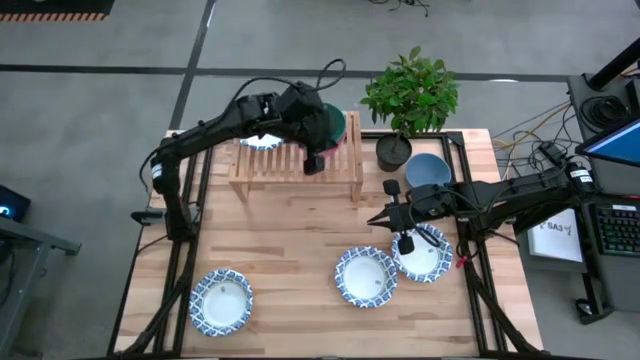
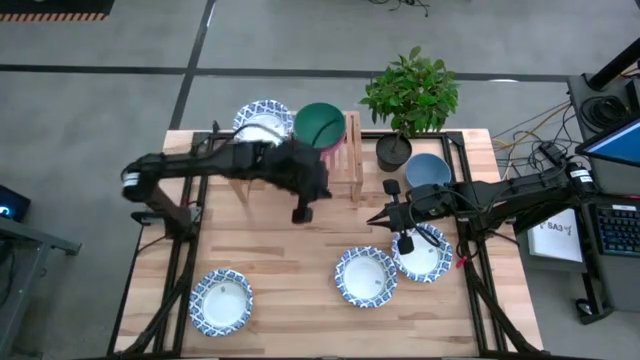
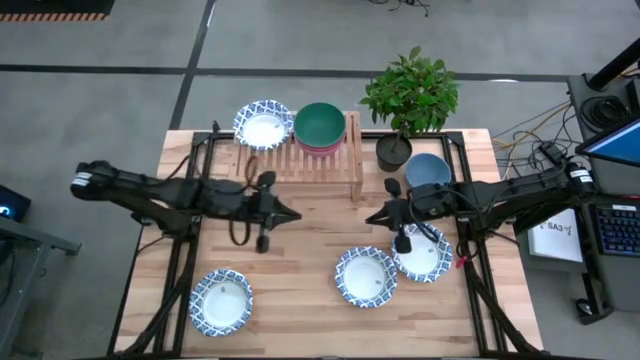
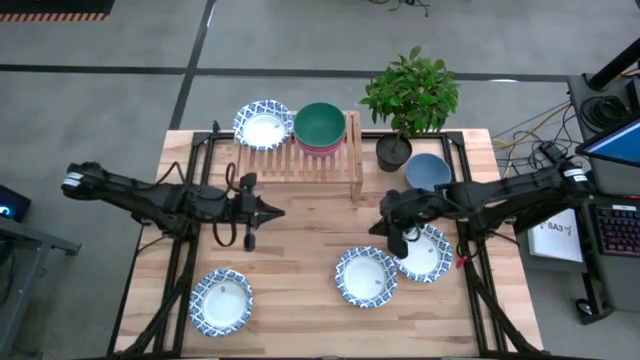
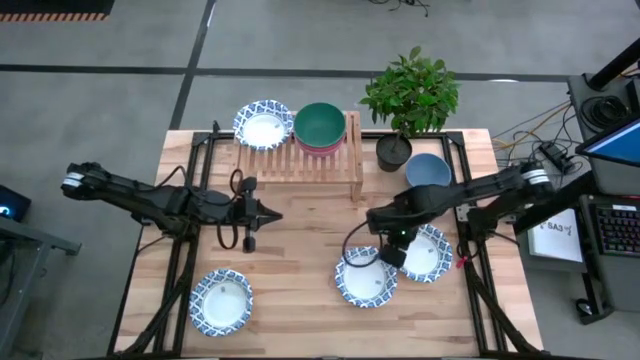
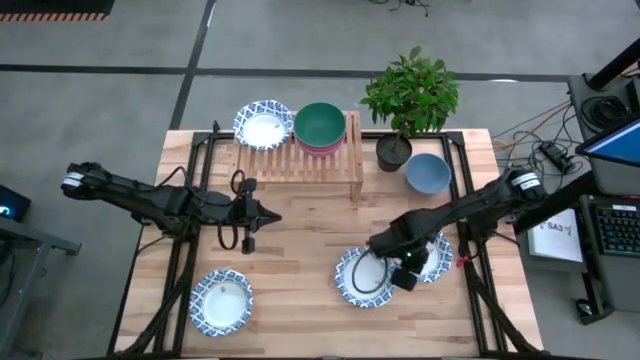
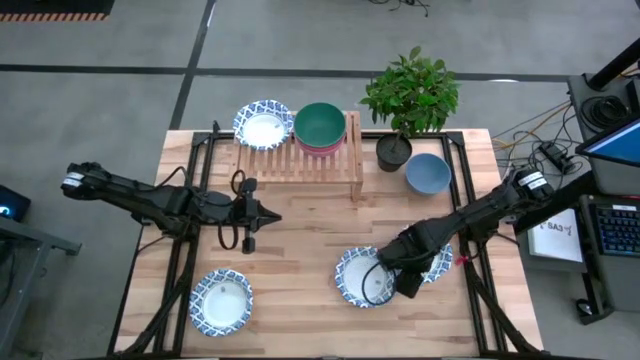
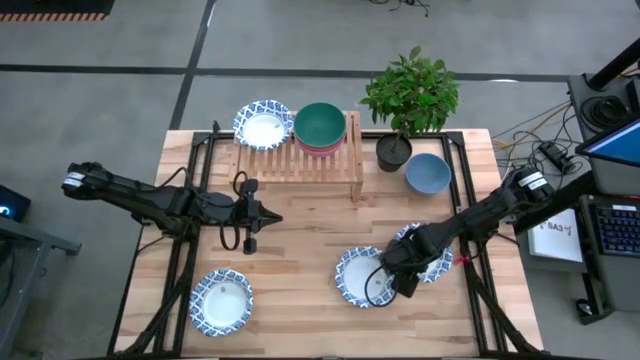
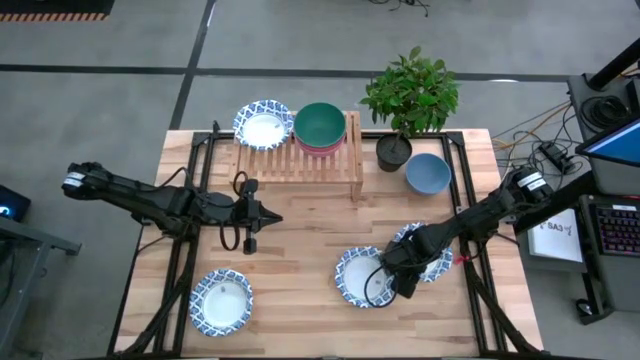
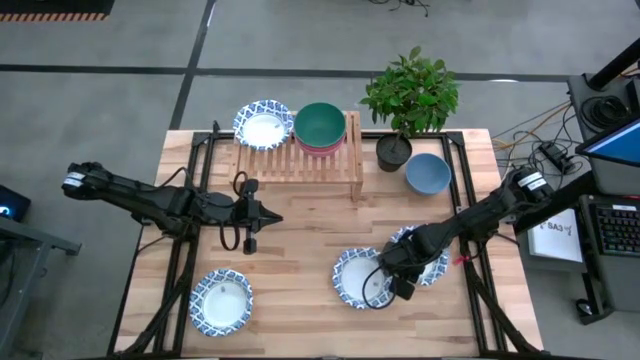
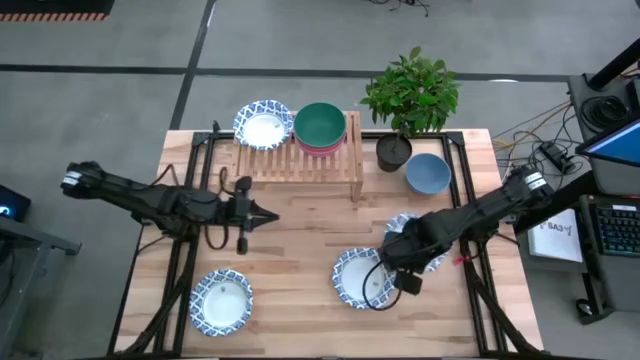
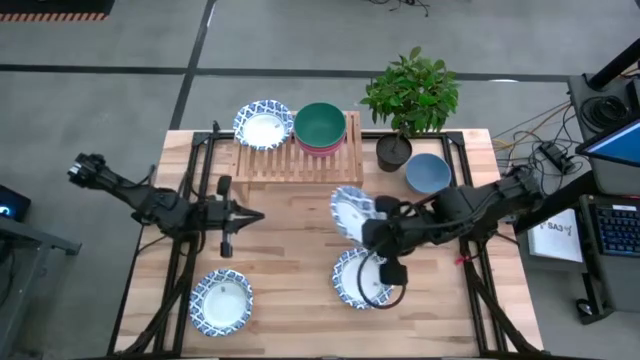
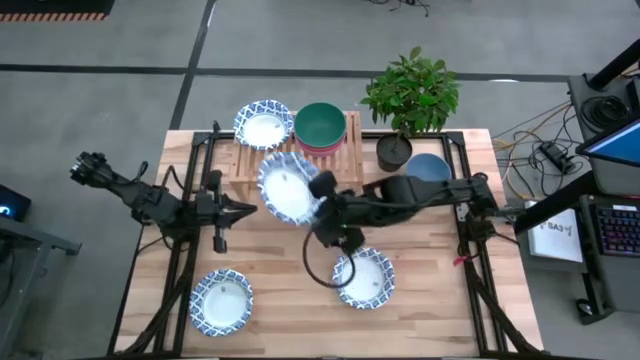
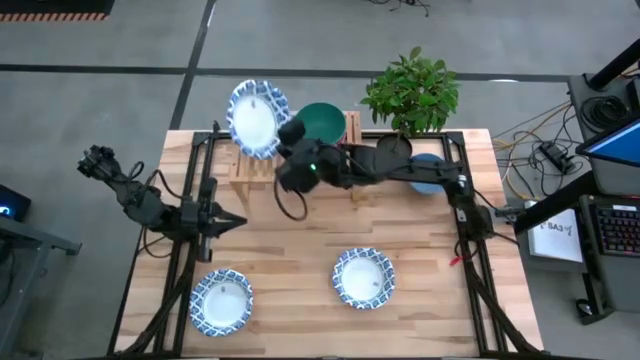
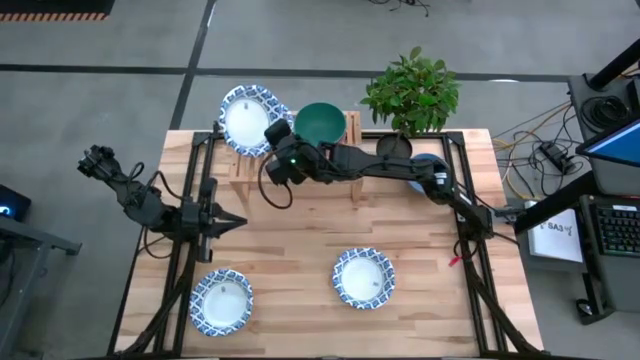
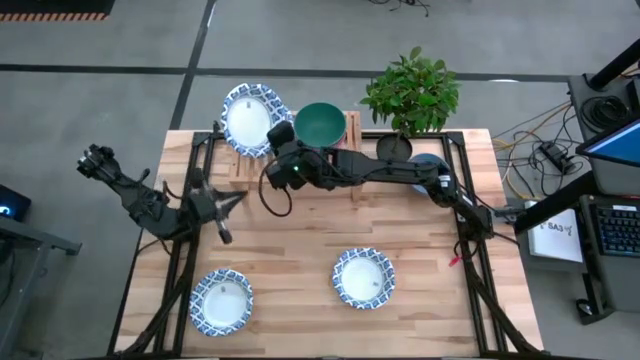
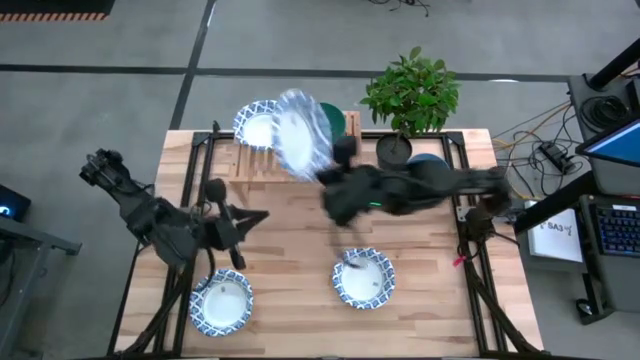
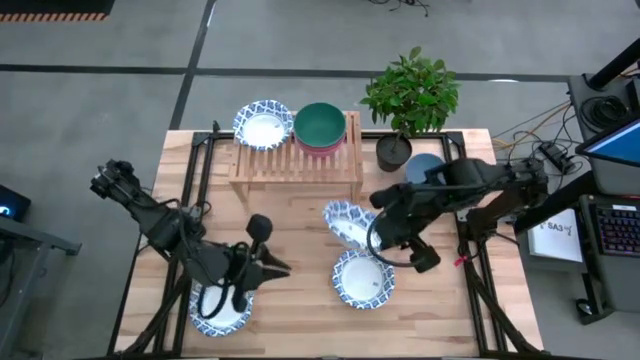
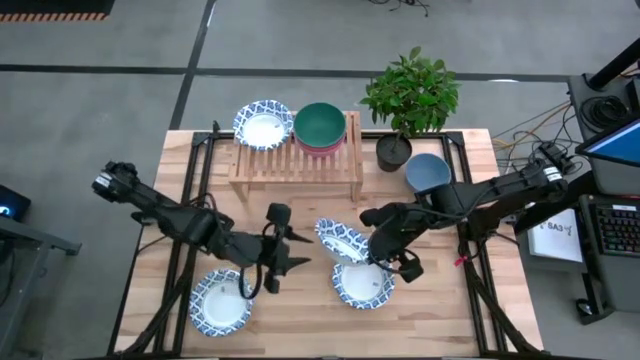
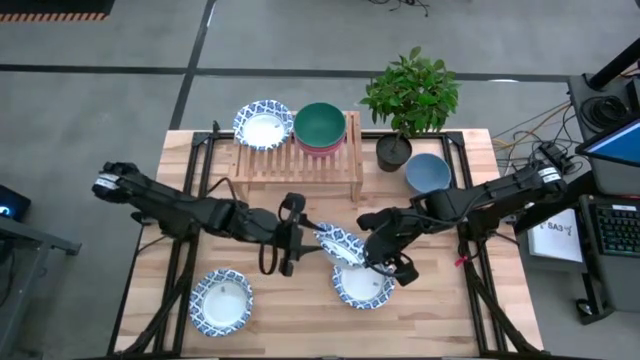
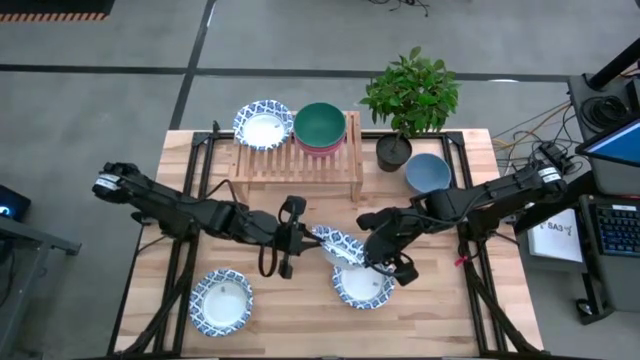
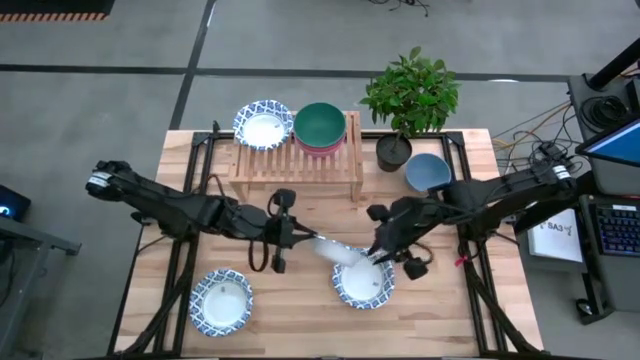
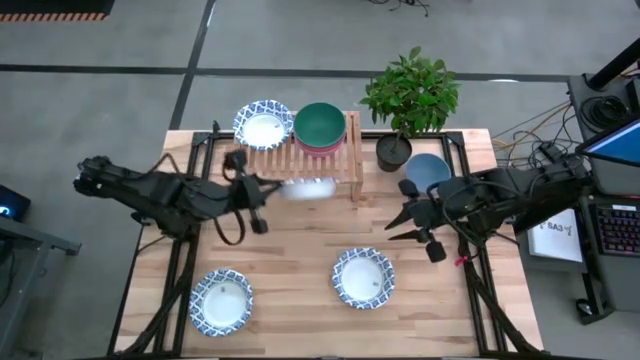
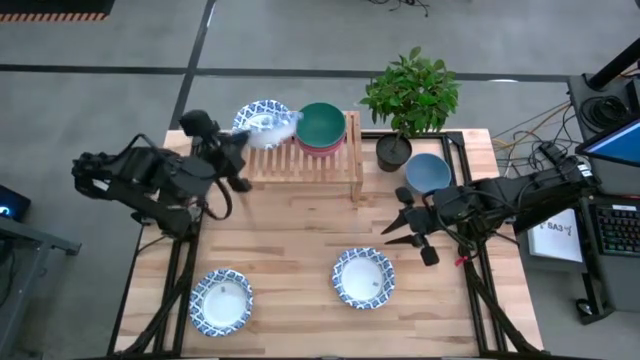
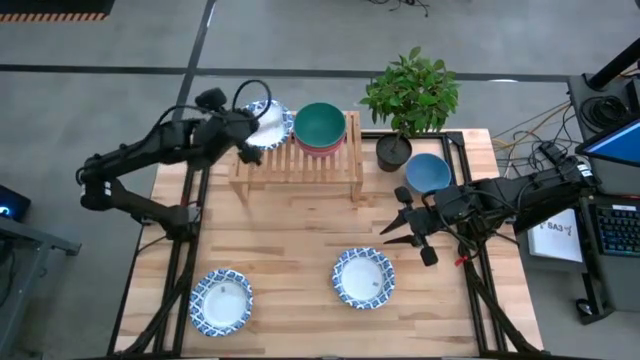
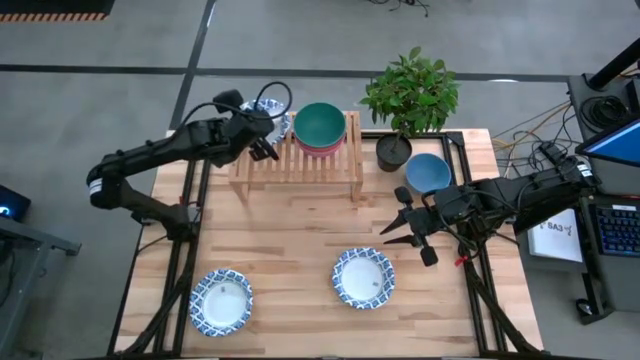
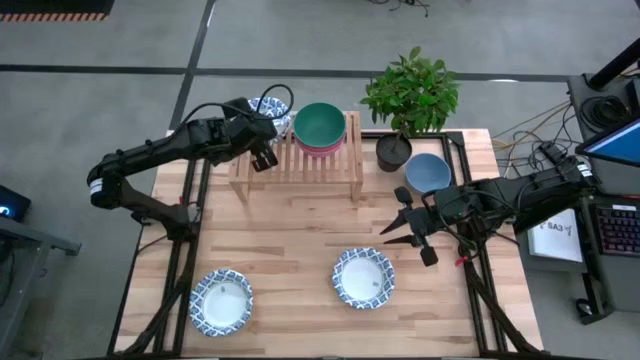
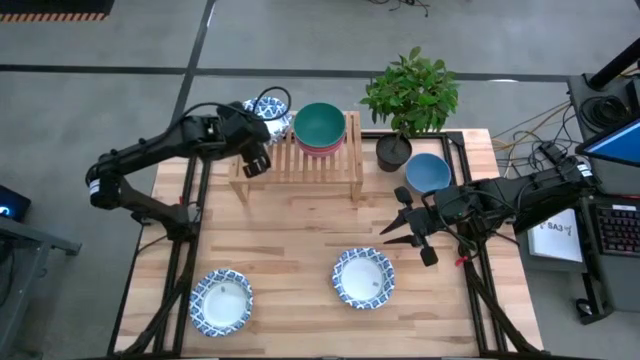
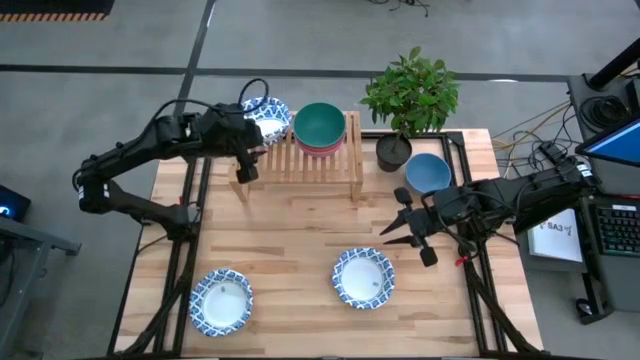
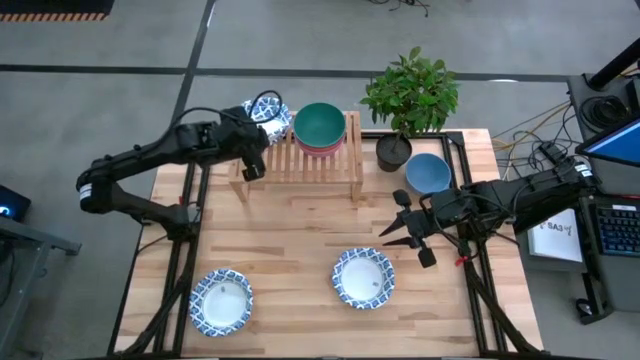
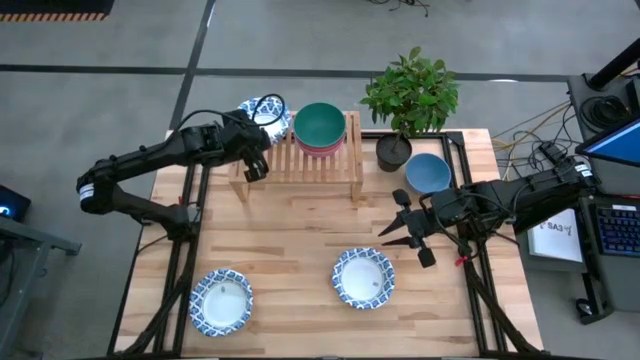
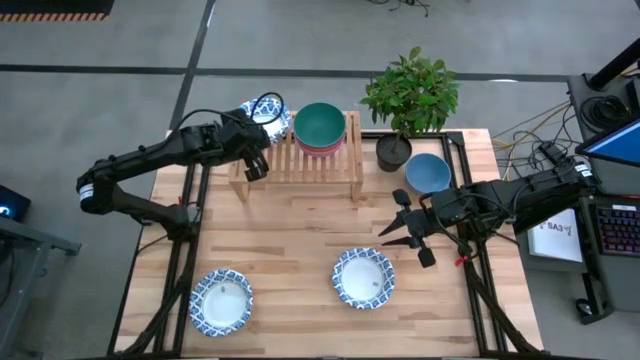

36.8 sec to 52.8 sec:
Task: Place and stack bowls onto a shelf
Stack the white bowl on the top of the other white bowl on the shelf
